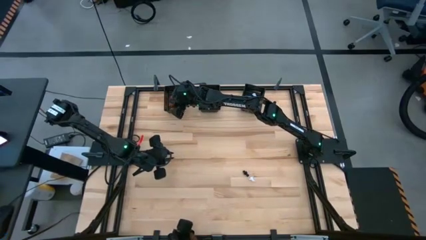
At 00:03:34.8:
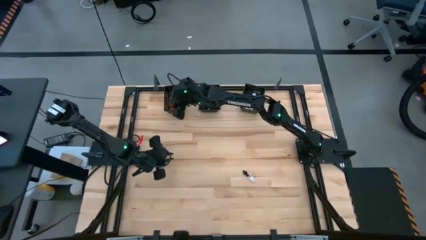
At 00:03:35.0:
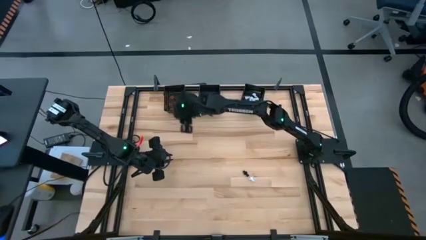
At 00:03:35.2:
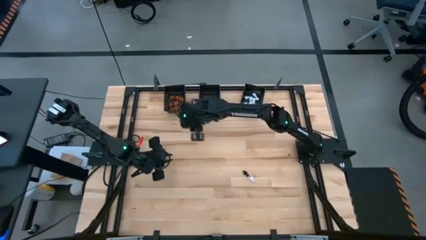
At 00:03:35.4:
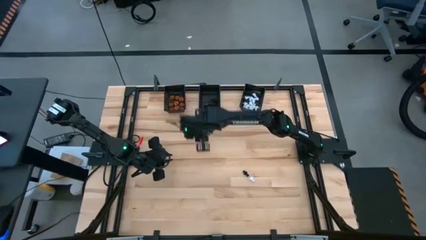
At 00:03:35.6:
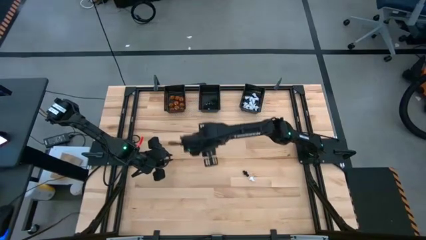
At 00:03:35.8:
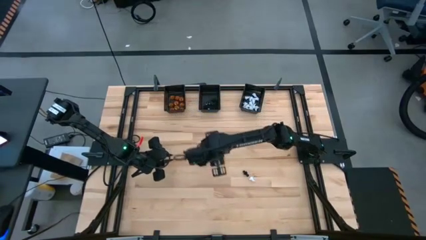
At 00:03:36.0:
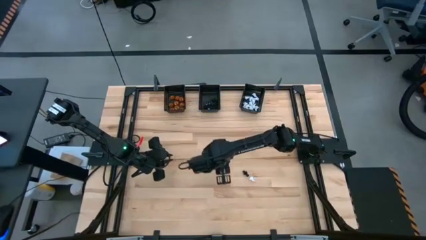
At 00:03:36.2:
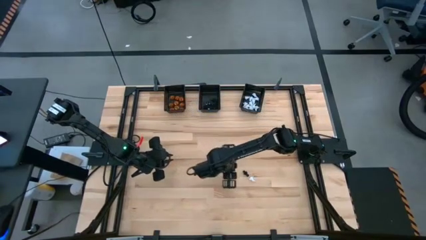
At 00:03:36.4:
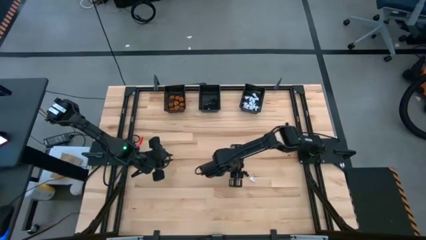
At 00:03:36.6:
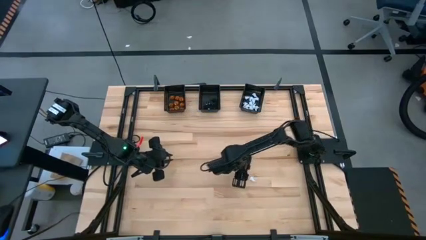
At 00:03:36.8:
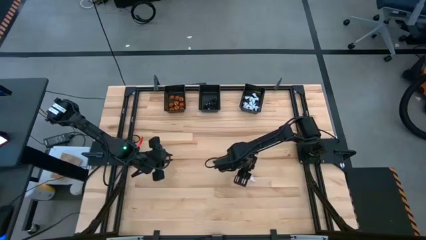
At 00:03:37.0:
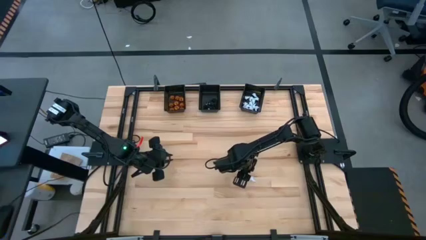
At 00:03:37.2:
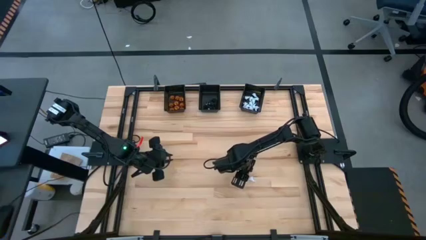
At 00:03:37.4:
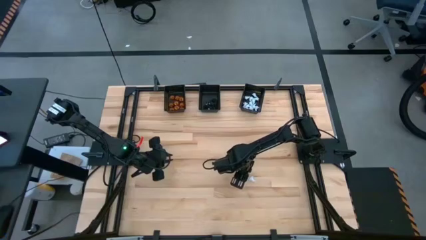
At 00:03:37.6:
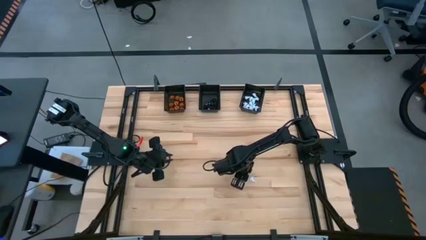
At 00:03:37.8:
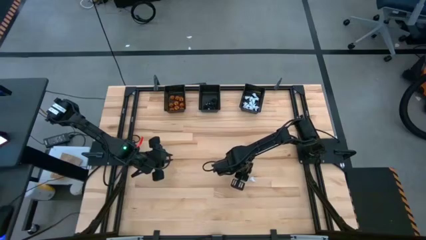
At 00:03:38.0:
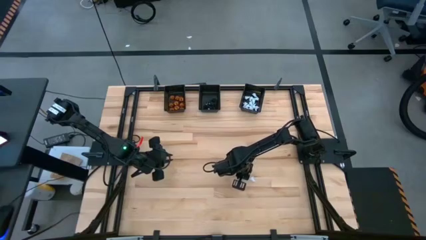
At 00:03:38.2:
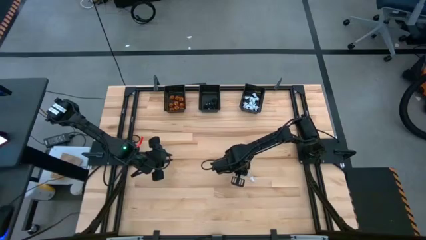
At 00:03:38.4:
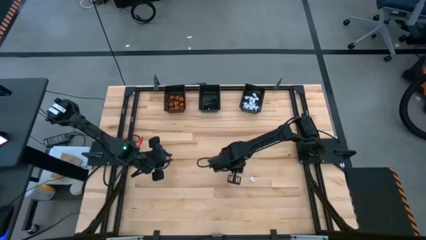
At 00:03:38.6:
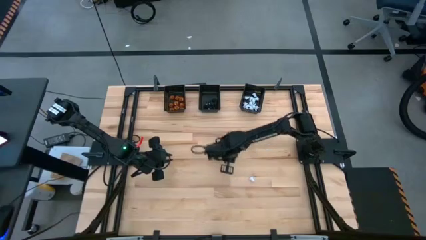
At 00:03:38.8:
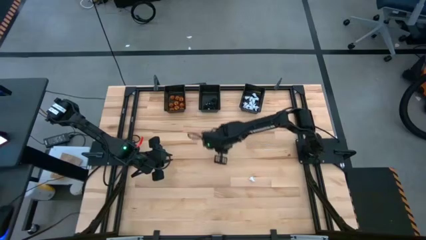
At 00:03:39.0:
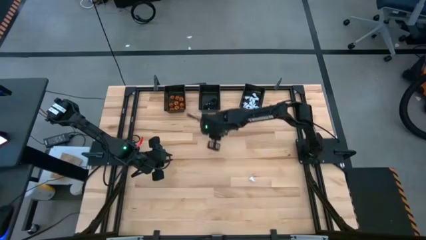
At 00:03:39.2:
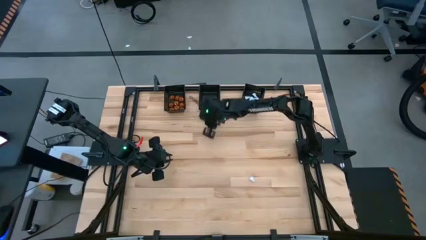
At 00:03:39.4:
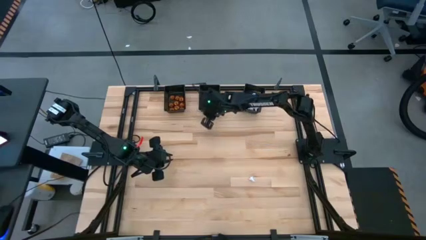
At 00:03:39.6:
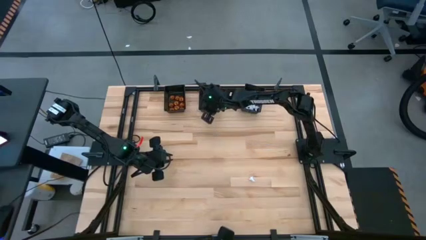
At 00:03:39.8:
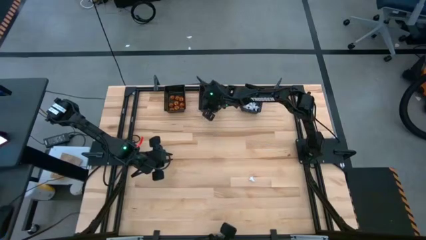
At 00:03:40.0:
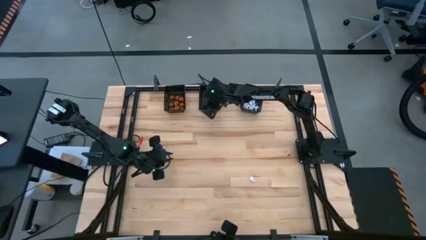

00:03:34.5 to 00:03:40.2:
Task: Sort Halloween decoration
Put the black skeleton toy into the black middle basket

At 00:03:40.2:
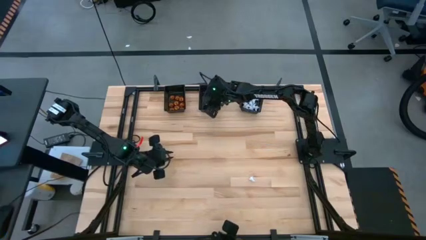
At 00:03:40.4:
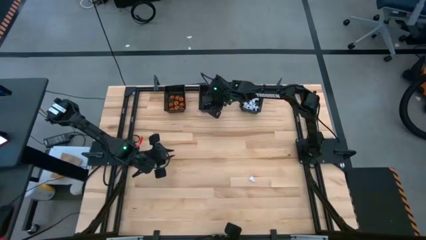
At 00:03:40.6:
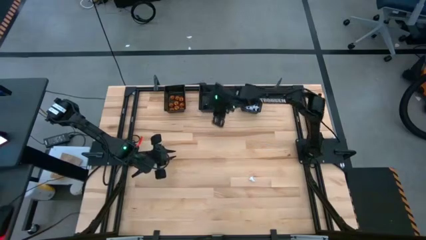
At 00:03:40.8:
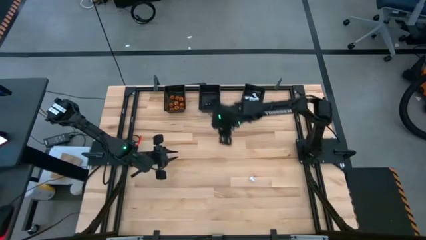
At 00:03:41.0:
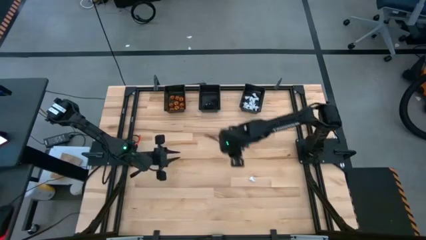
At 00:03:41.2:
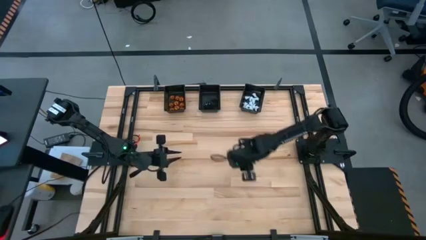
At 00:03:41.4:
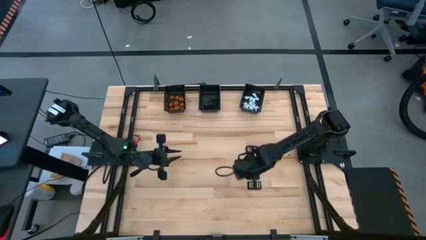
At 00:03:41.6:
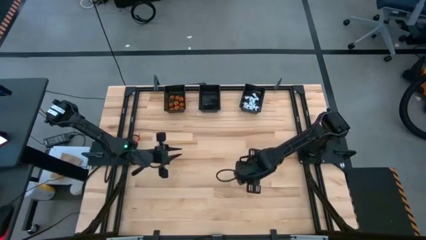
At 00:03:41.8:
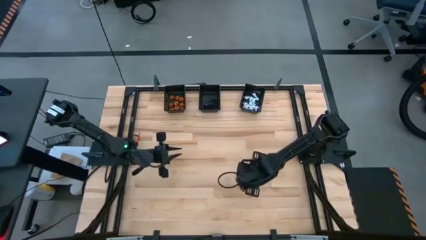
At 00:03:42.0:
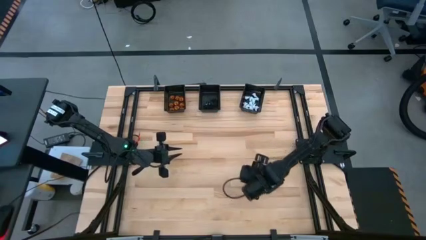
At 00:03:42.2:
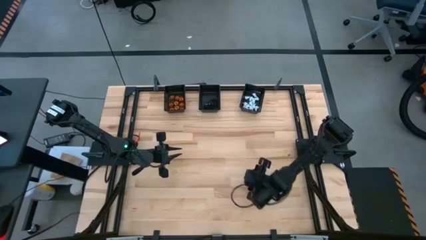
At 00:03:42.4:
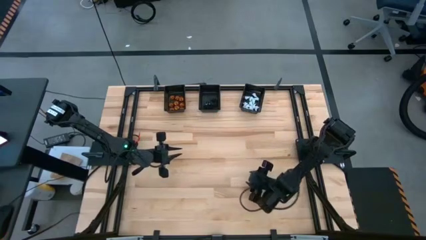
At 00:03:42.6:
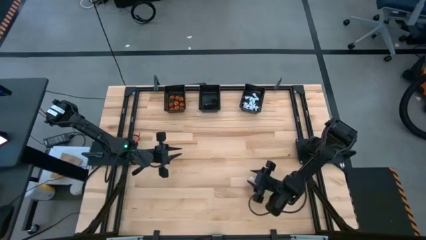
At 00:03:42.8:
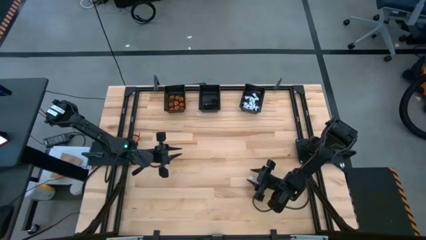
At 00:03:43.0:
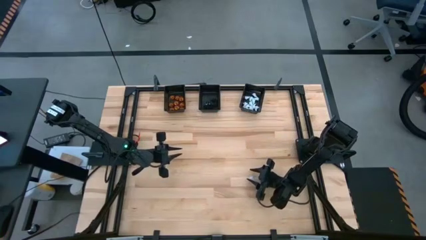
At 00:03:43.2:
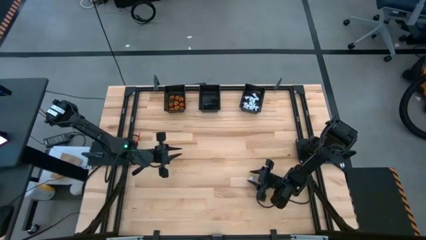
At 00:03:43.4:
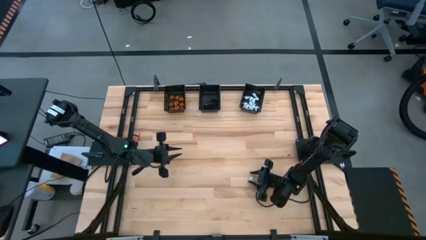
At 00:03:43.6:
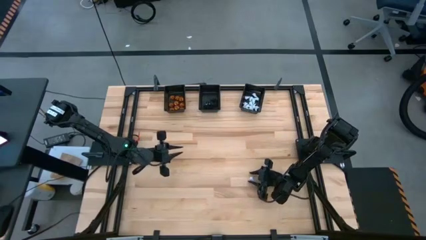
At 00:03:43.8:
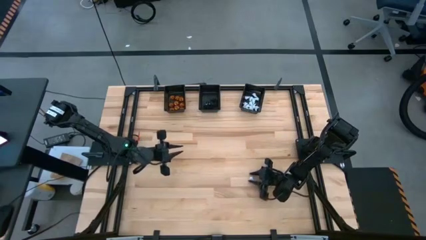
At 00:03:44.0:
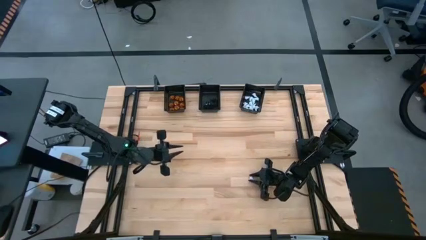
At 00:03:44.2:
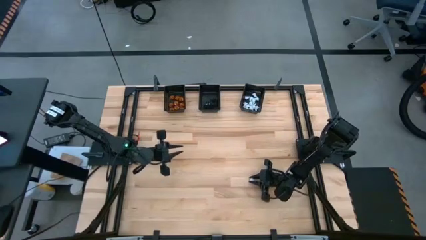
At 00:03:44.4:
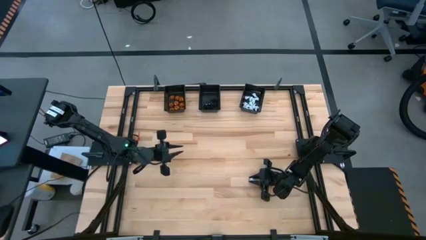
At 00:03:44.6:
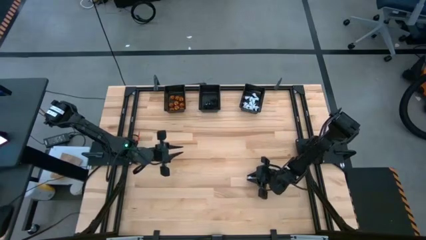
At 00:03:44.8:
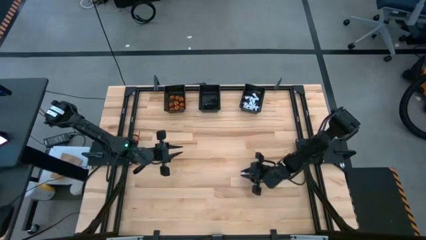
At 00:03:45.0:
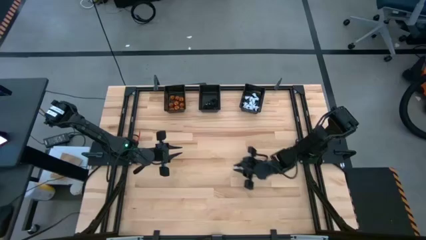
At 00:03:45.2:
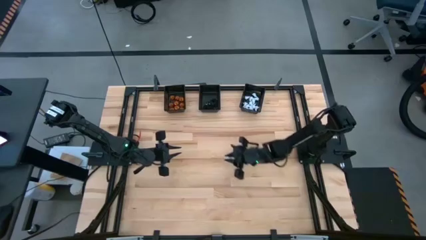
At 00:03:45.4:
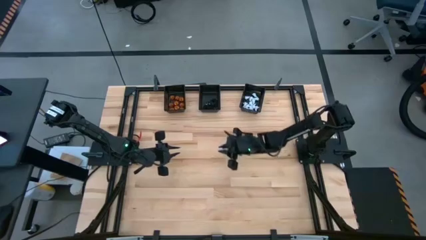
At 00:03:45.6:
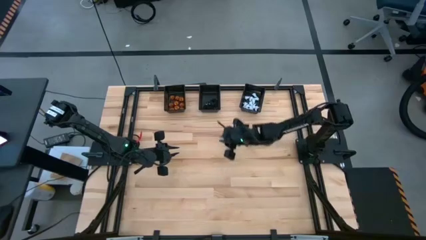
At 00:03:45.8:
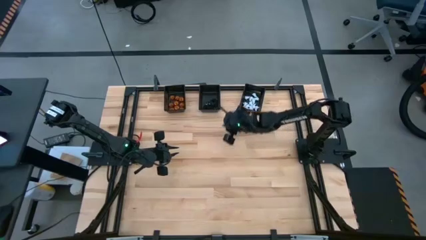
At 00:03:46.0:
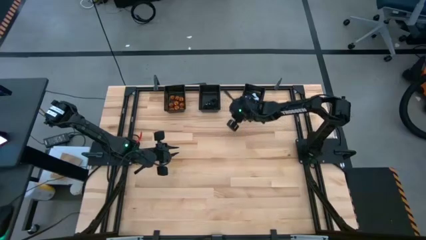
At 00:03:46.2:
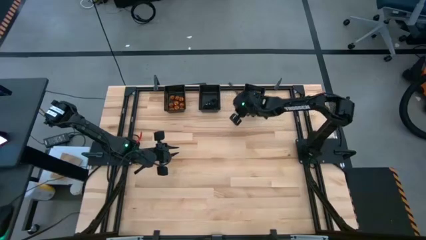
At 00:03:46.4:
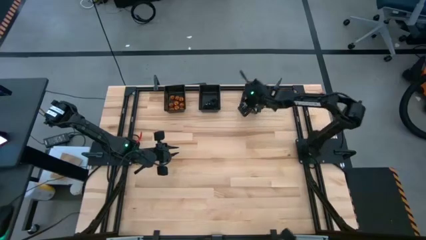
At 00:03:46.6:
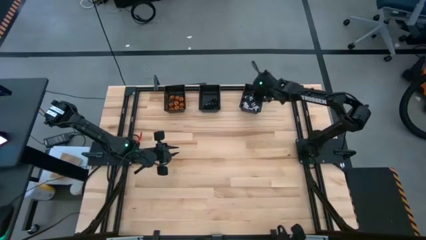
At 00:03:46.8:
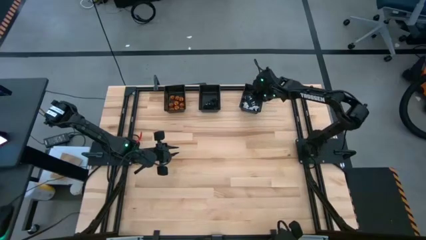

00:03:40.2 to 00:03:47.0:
Put the white ghost toy into the right black basket

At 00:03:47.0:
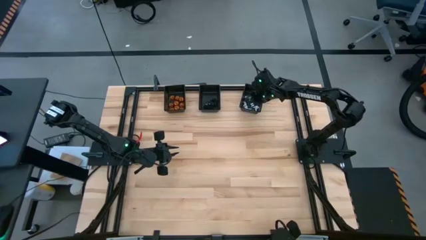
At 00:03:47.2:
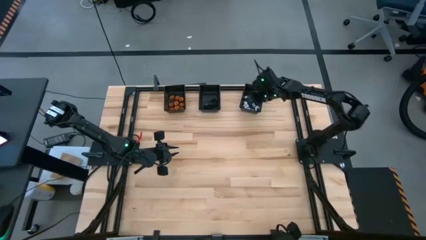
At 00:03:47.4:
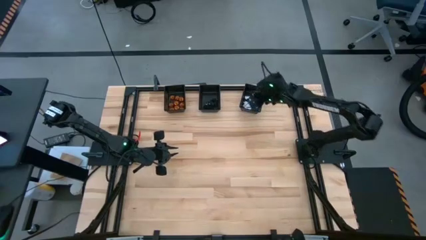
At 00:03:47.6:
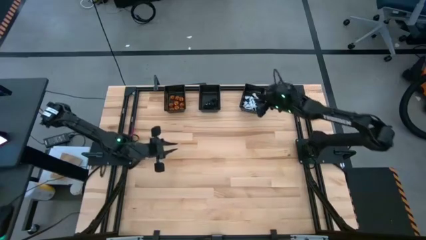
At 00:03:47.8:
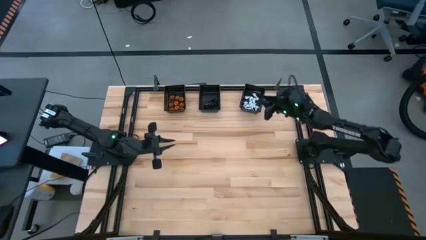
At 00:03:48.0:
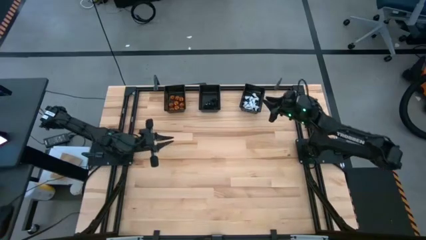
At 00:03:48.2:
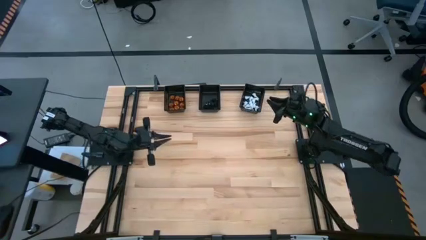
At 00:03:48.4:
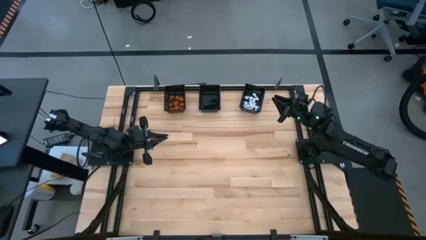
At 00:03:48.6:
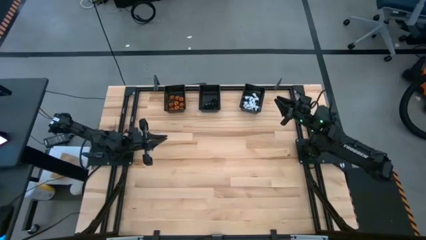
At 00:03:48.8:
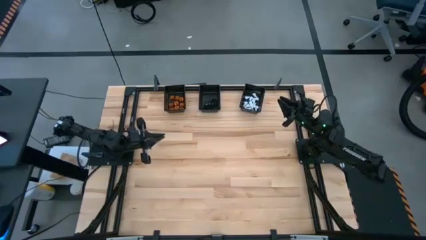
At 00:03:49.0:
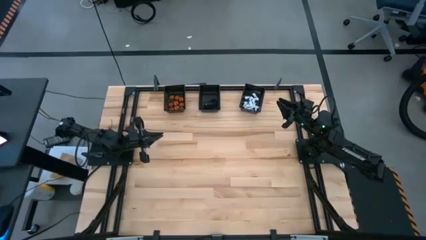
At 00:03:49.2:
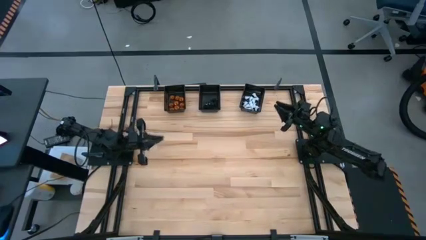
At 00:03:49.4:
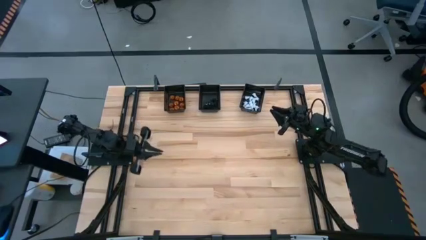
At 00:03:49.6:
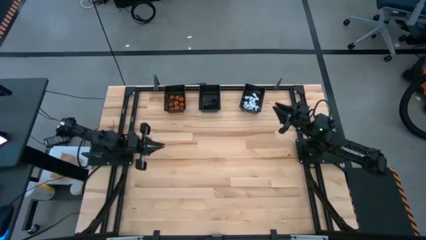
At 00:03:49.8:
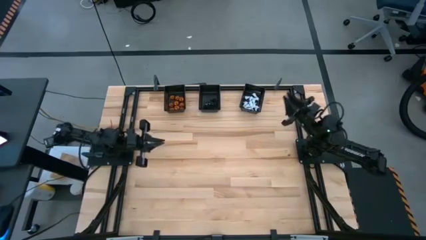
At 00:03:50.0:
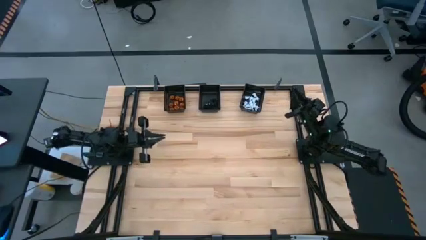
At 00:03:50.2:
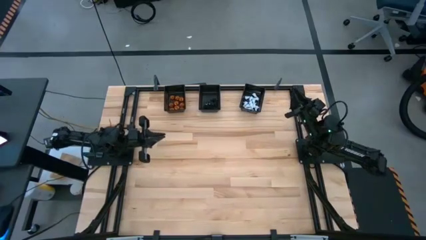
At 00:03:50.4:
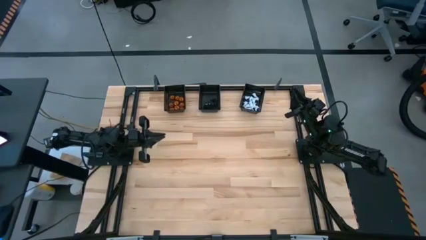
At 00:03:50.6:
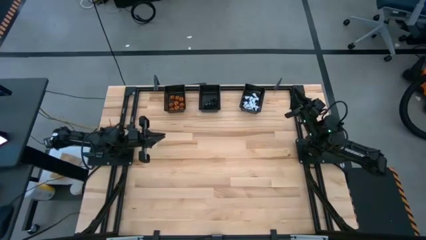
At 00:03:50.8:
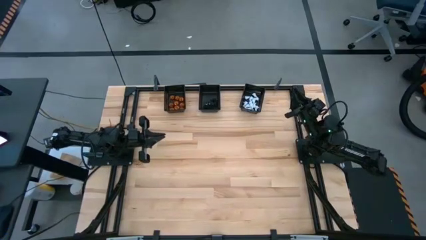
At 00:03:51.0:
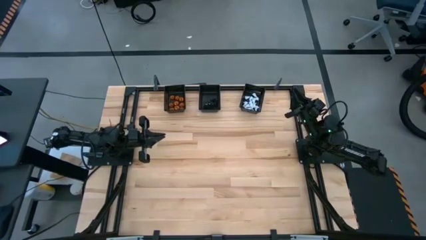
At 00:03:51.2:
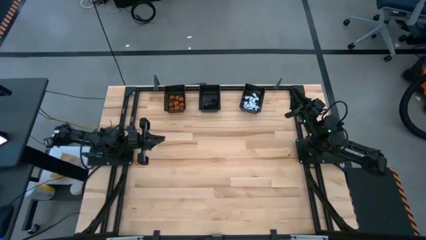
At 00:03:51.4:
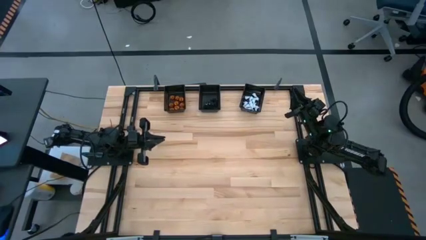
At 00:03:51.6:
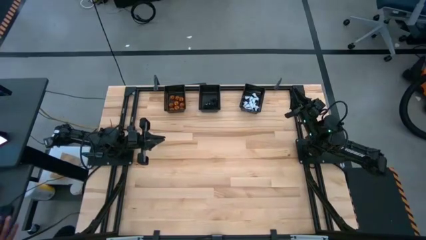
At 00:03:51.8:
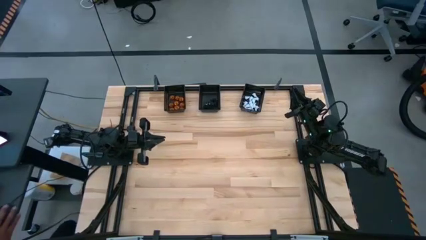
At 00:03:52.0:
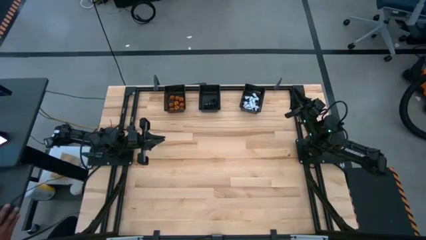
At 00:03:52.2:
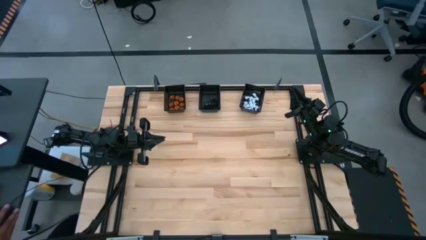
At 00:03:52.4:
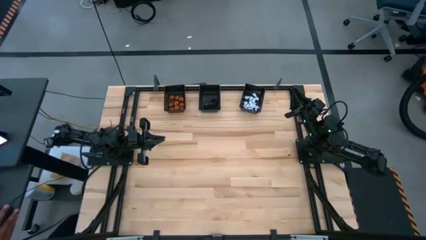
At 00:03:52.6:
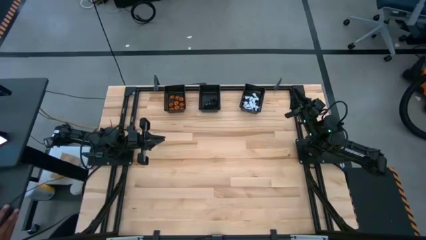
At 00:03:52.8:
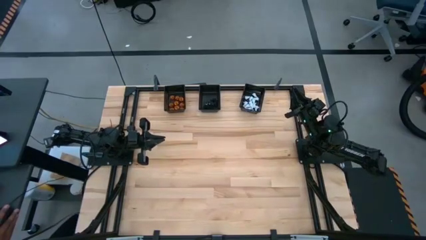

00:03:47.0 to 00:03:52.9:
Return to Home Position
